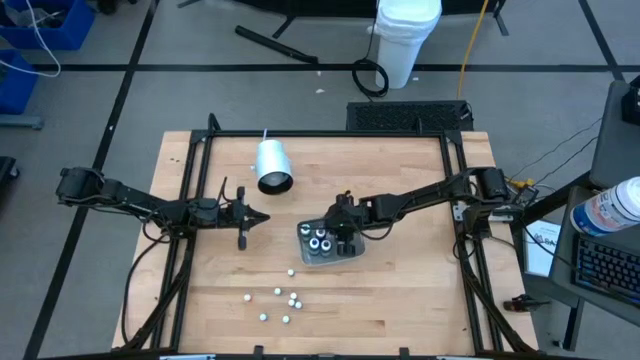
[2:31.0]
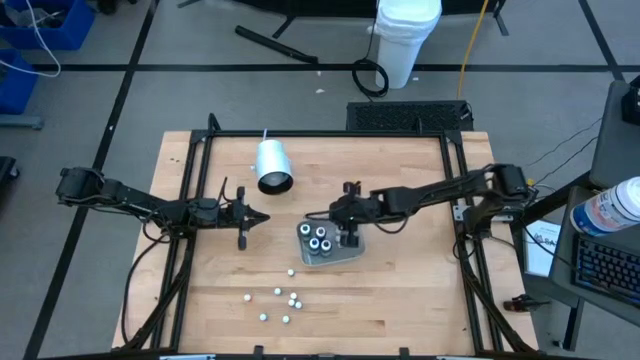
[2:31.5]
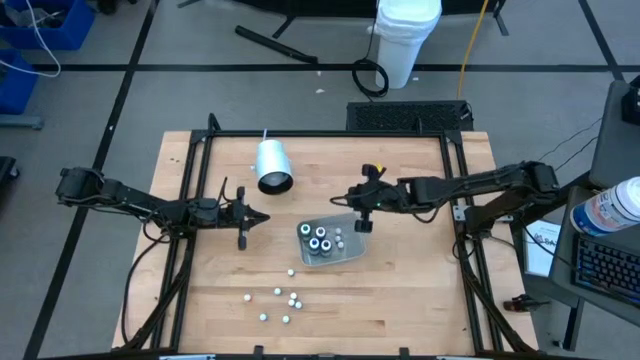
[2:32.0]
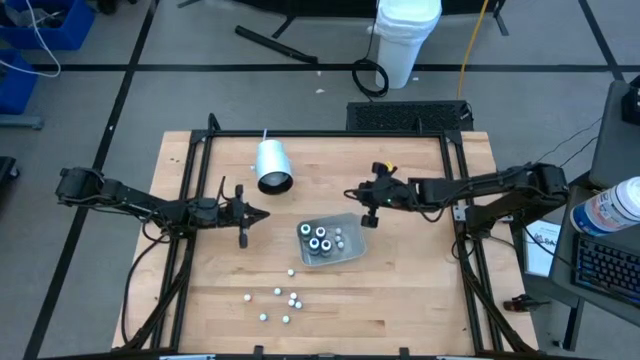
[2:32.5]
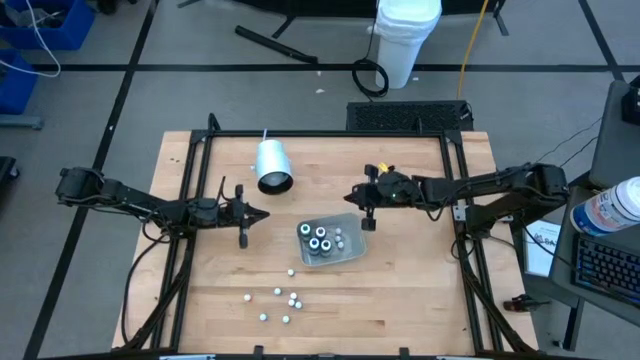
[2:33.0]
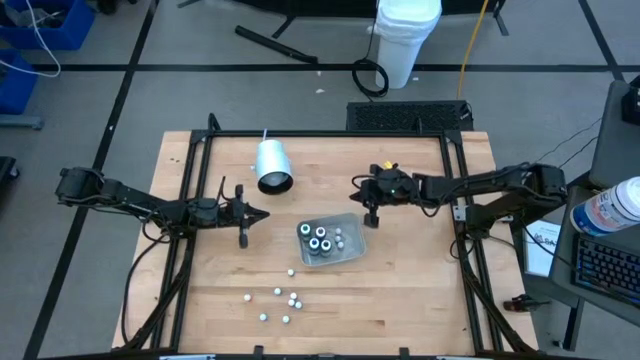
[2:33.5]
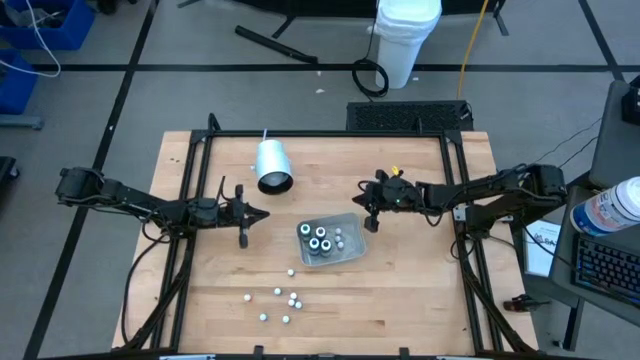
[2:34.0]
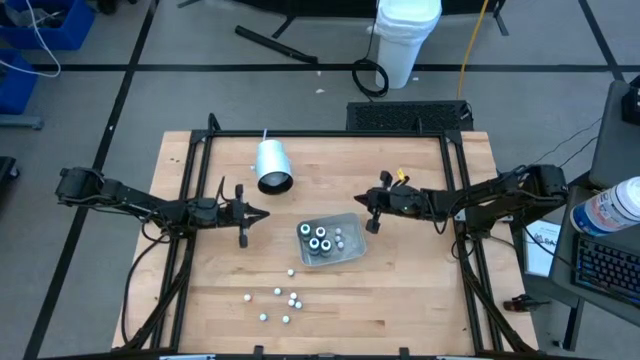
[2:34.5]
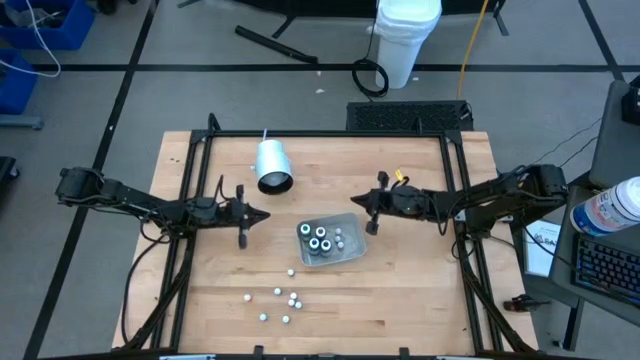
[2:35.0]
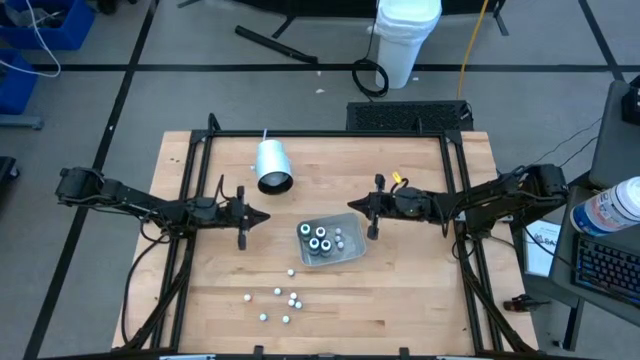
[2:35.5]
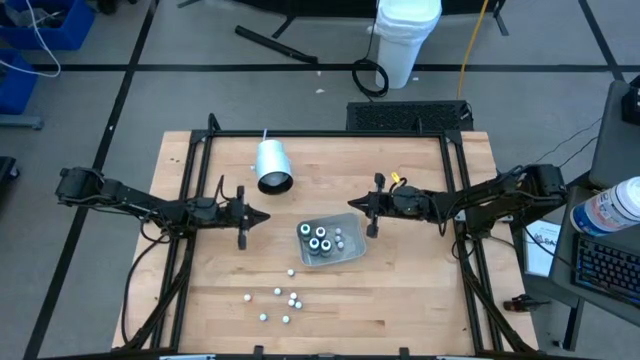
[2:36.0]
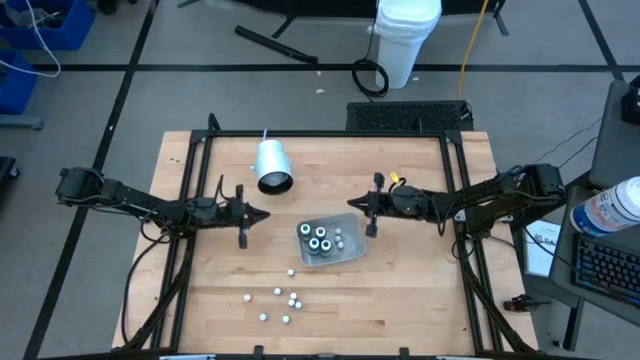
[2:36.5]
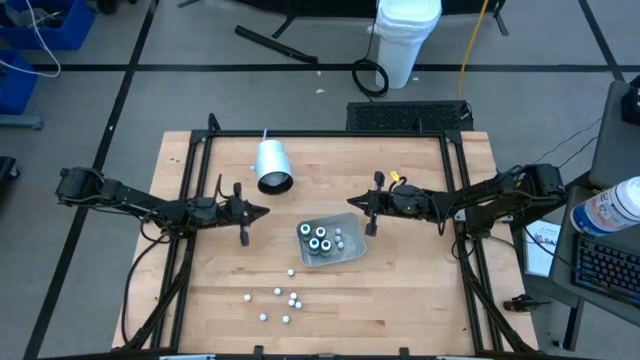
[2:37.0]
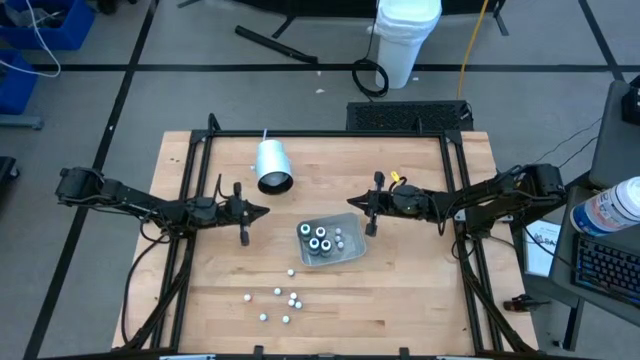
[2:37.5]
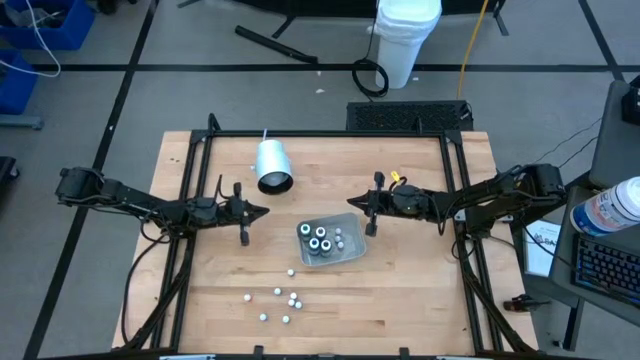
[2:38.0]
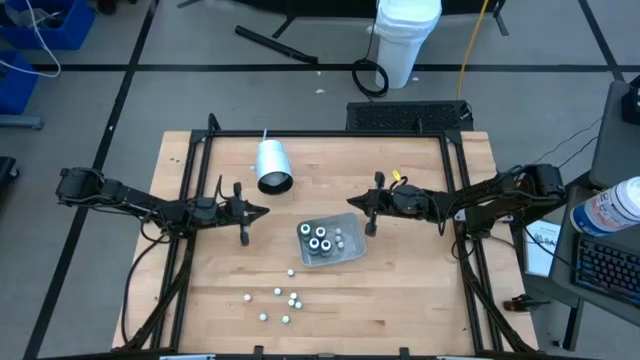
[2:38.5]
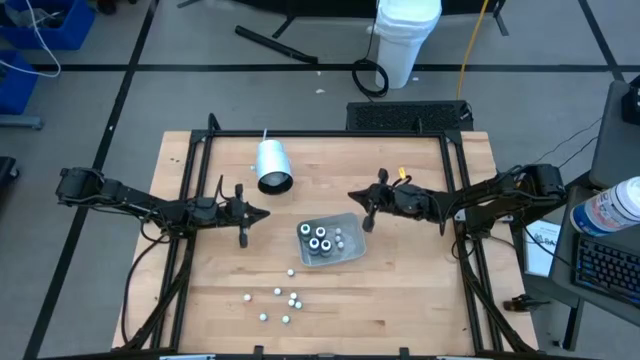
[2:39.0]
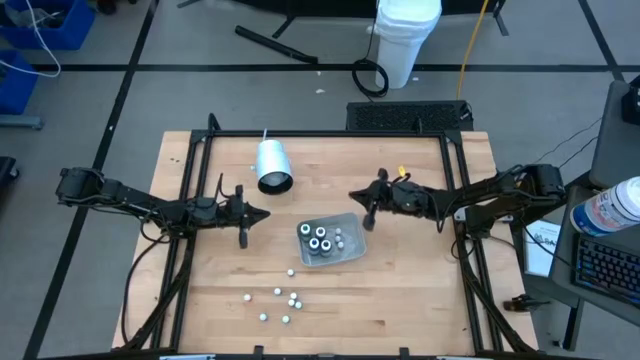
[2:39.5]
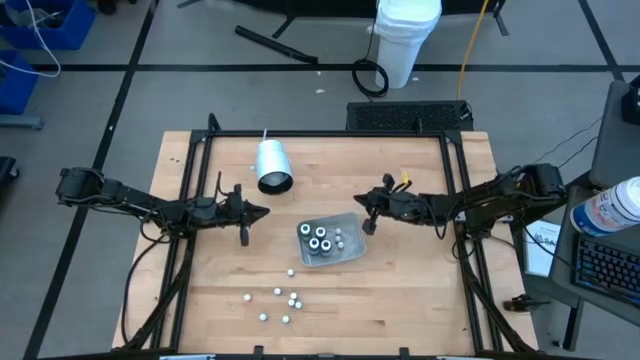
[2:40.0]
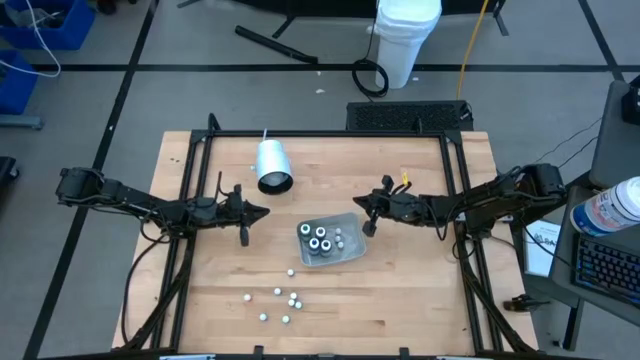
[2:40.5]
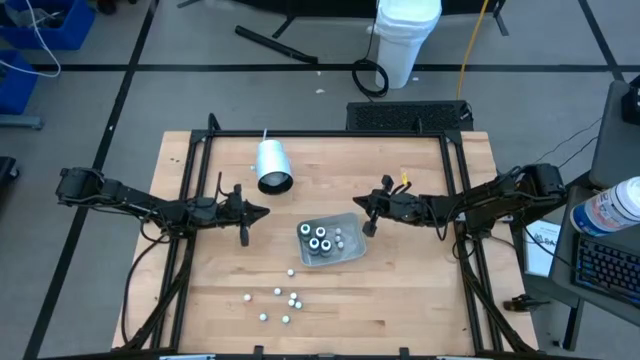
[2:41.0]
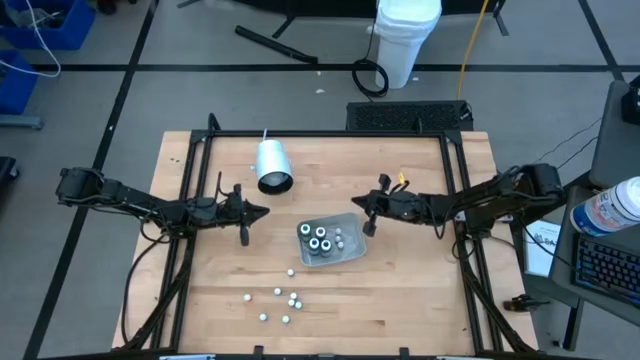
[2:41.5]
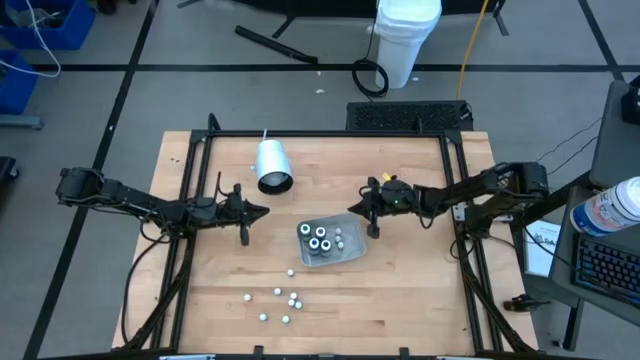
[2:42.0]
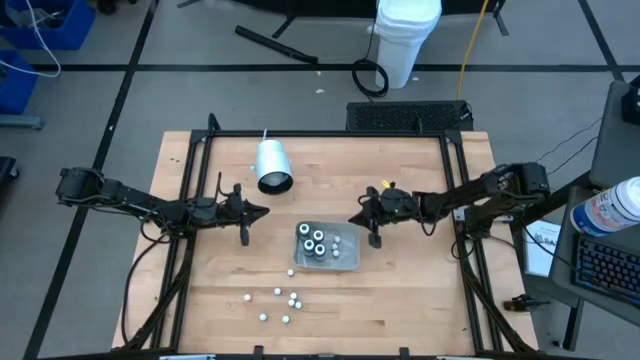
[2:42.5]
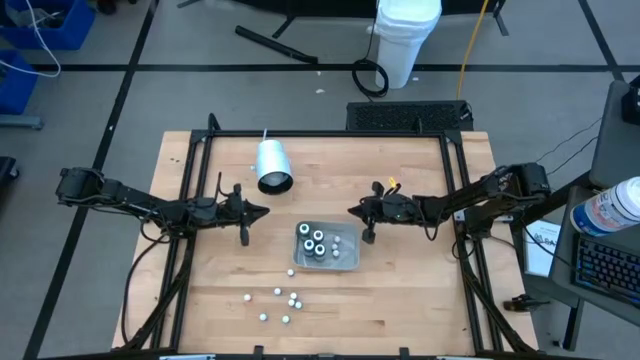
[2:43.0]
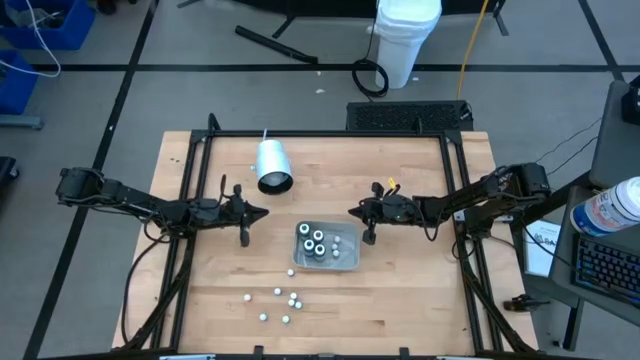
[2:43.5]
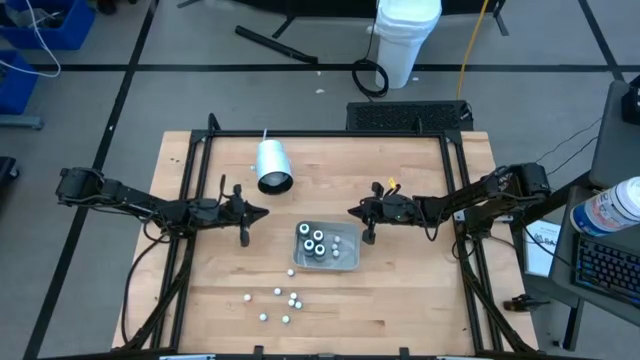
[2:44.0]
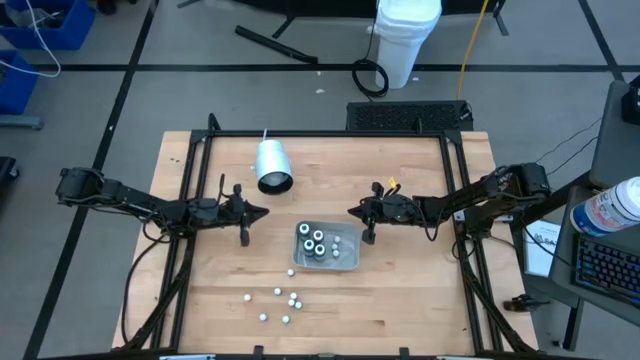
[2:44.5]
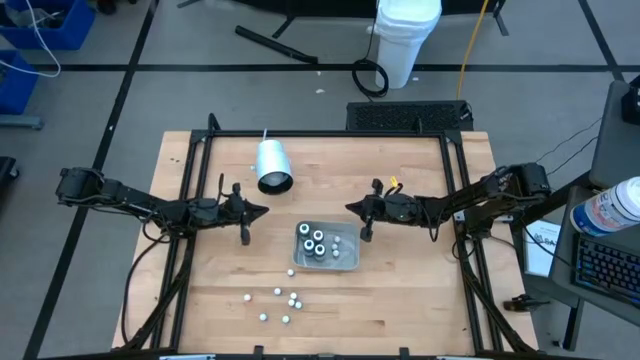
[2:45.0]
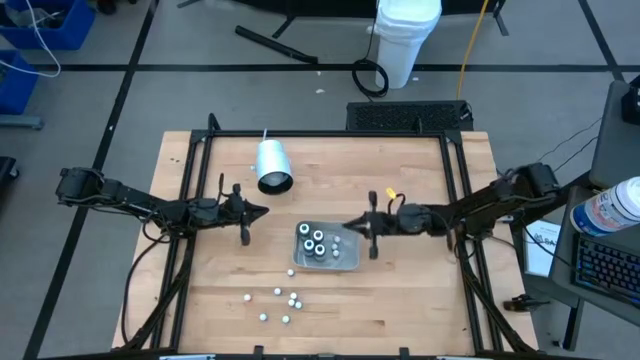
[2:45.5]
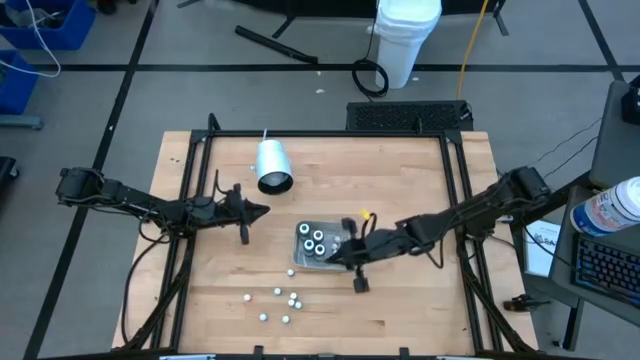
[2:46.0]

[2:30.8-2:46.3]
Task: Pick & Place food coloring
Put the orange food coloring bottle into the gray bin
